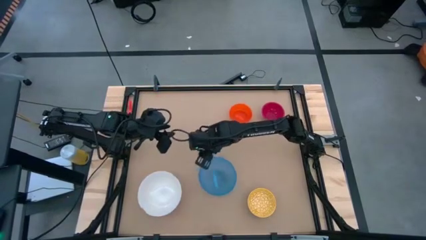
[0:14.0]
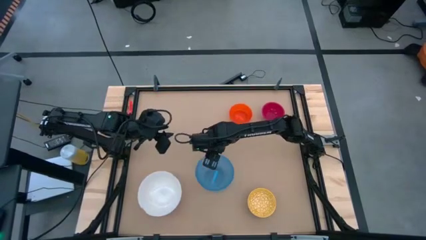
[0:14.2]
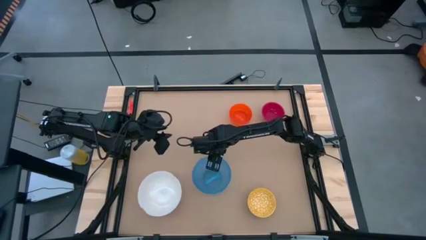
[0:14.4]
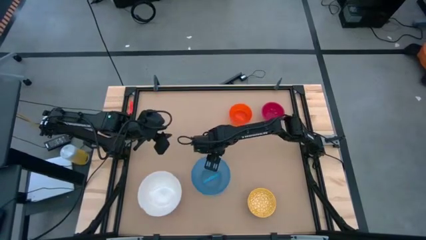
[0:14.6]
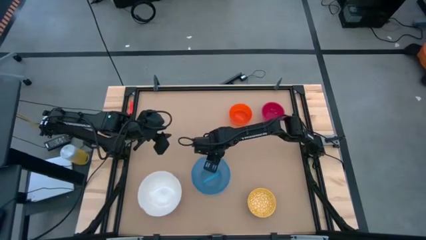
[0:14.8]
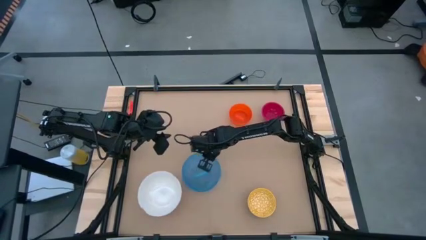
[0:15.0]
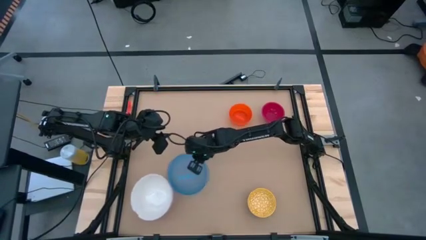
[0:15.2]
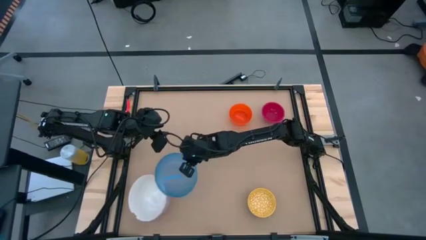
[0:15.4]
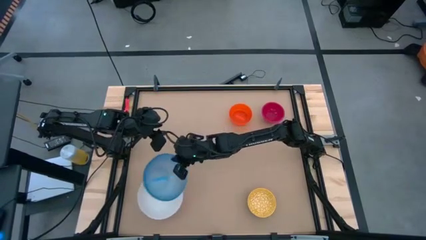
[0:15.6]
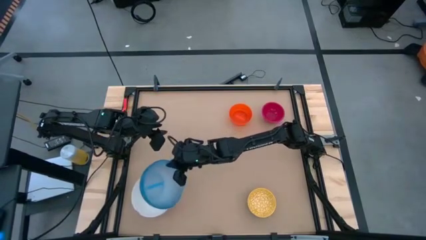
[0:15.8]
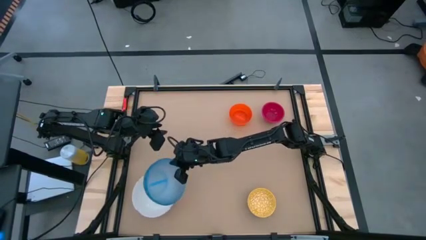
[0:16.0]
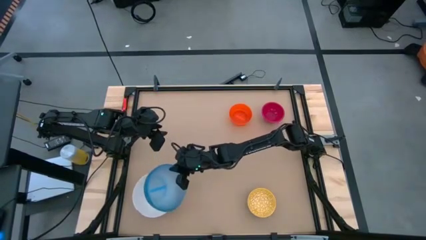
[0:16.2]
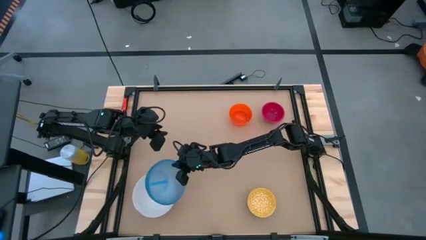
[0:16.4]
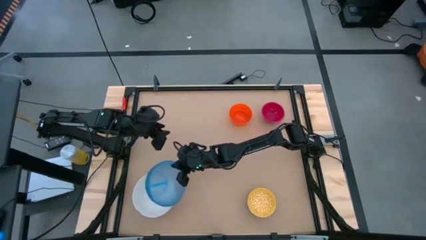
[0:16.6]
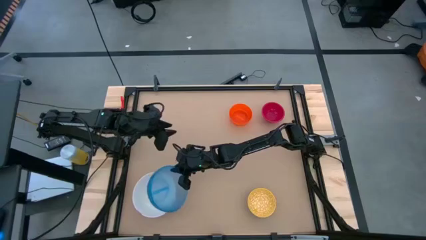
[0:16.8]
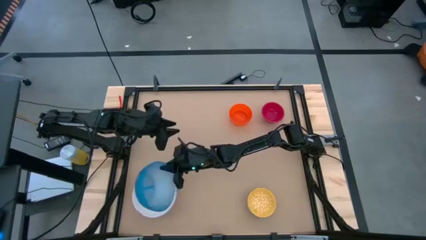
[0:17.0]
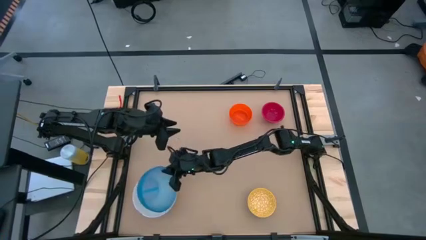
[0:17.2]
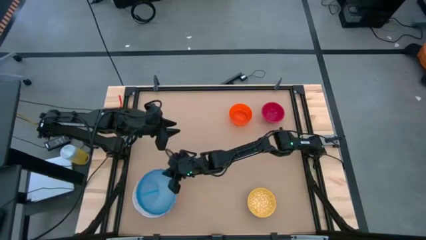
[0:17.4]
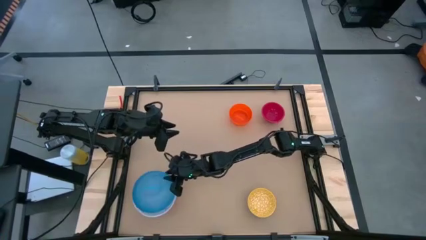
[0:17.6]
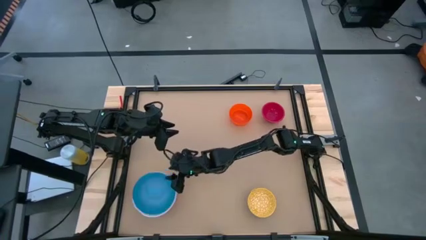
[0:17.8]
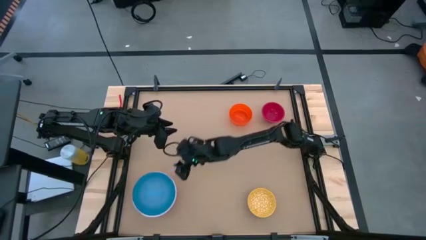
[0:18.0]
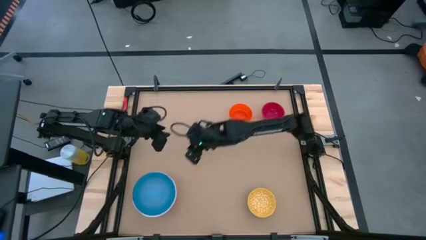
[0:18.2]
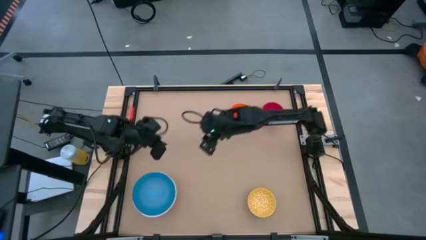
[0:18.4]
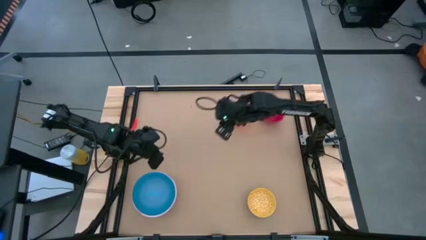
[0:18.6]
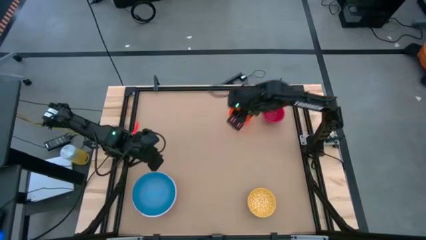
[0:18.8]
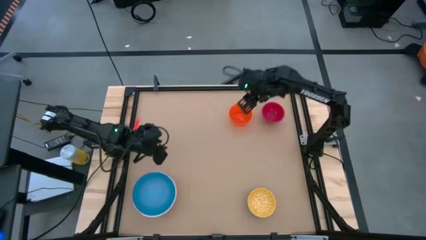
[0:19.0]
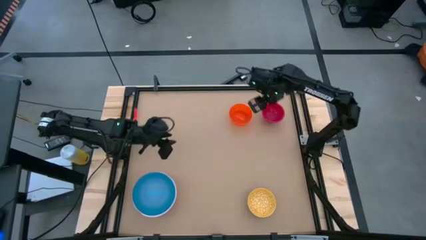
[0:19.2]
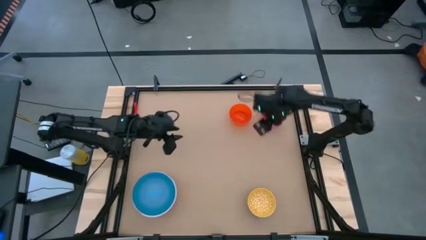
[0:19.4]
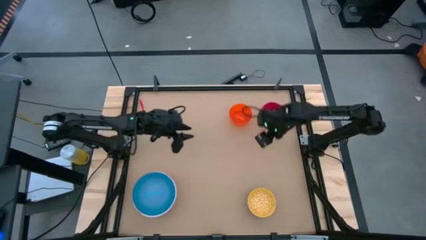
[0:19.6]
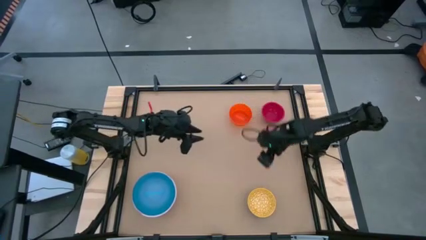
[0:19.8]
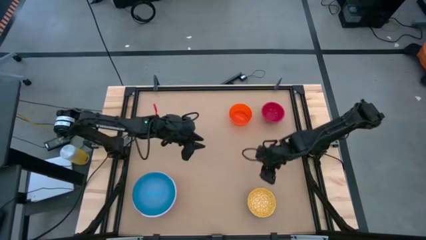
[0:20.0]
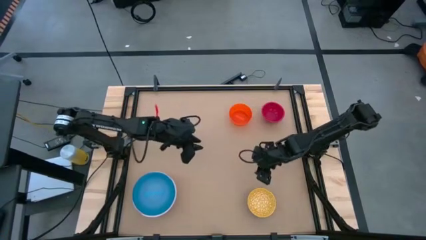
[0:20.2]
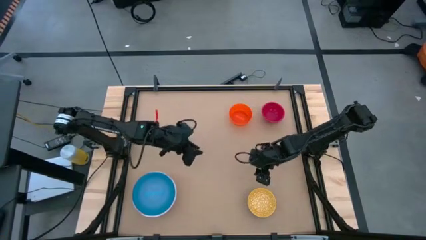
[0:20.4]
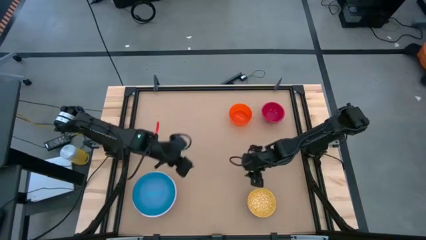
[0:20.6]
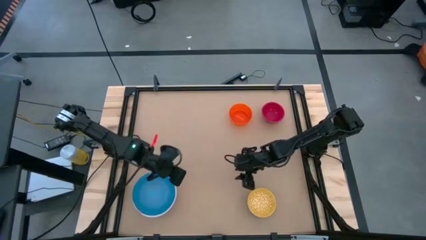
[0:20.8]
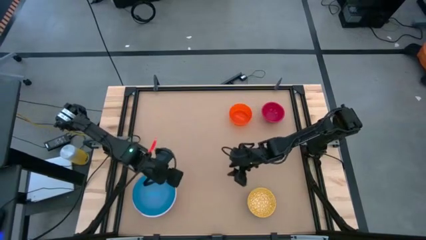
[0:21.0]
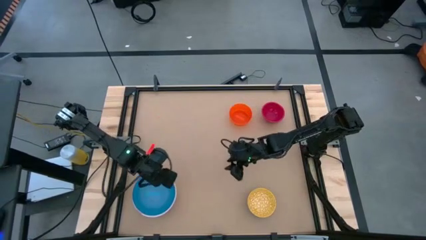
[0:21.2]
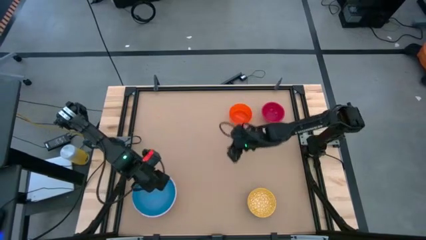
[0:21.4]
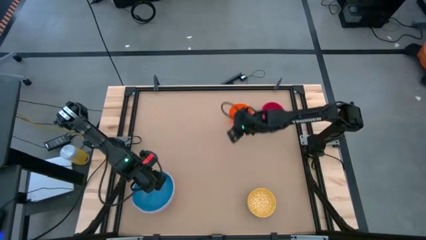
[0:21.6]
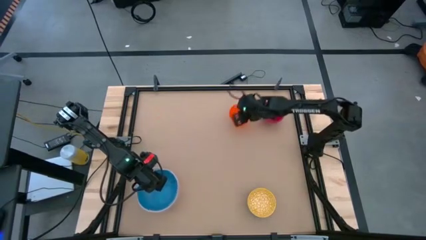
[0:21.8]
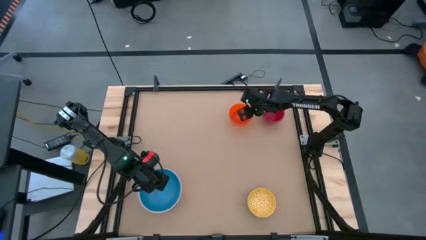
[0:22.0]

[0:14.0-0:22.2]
Stack the blue bowl on top of the white bowl

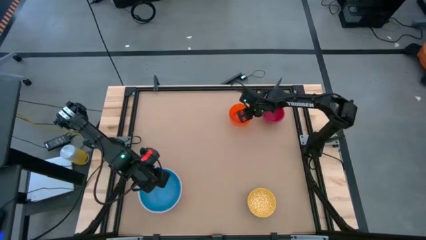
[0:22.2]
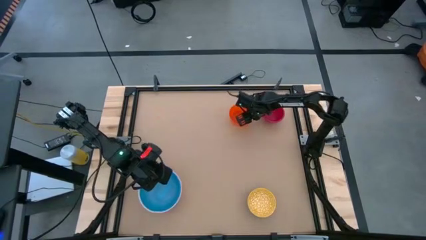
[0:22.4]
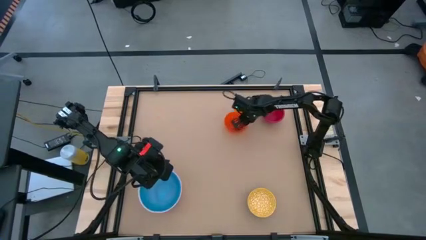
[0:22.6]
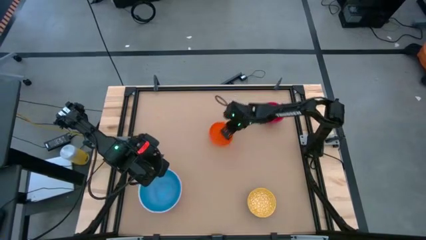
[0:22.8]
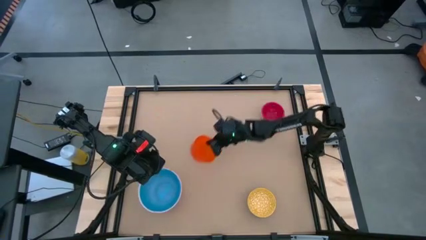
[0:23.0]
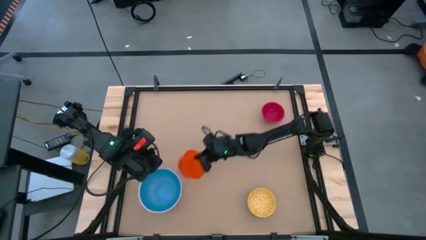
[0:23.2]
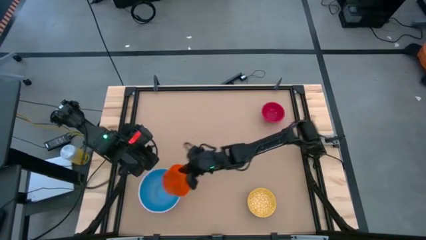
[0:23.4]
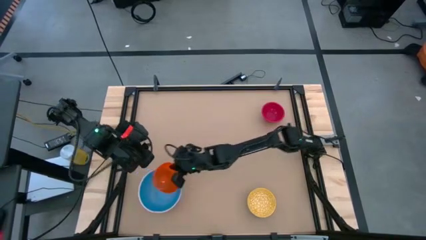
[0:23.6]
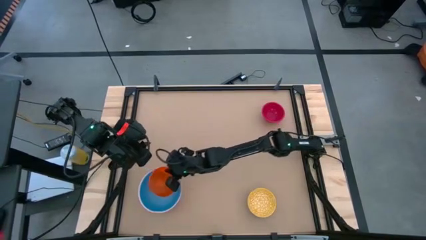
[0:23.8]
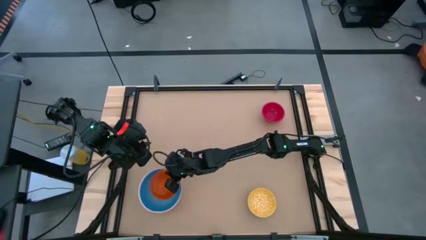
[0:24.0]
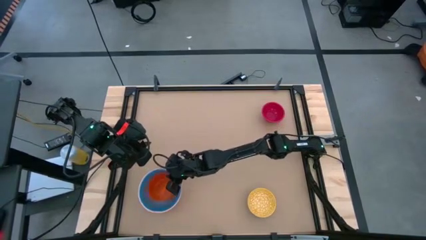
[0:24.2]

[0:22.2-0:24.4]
Stack the orange bowl on top of the blue bowl

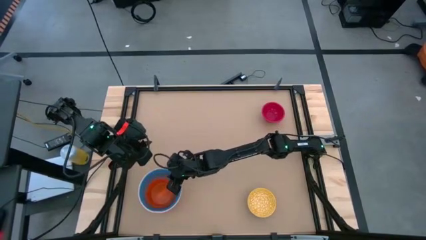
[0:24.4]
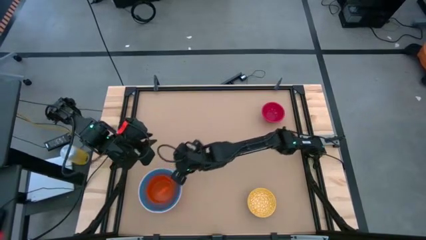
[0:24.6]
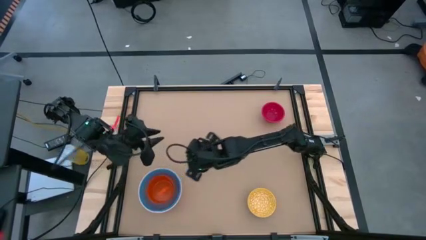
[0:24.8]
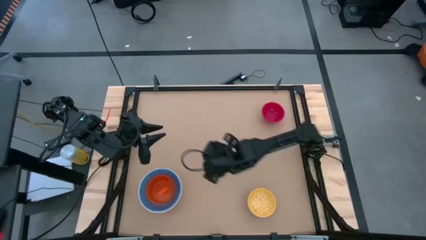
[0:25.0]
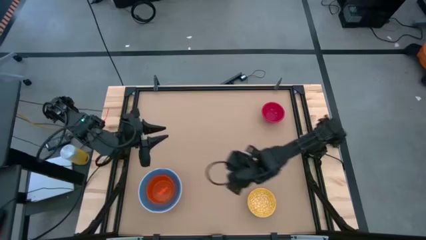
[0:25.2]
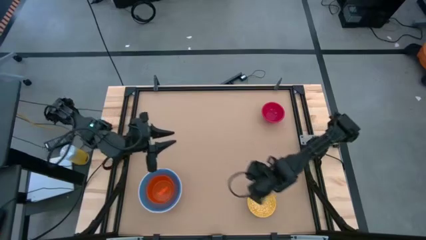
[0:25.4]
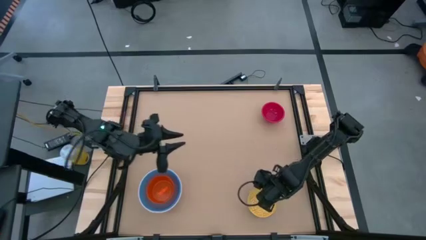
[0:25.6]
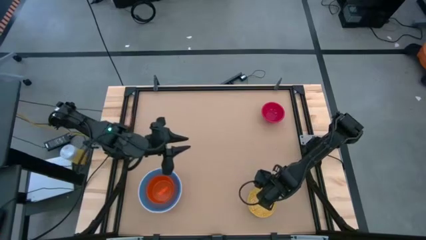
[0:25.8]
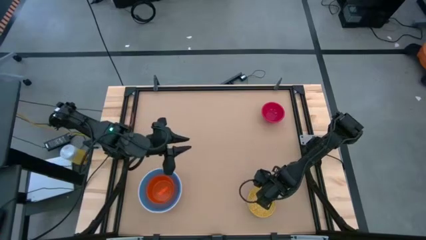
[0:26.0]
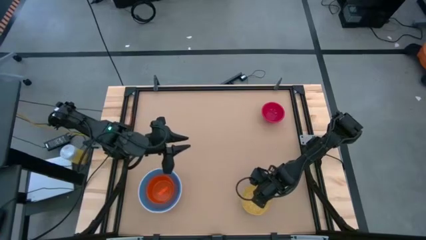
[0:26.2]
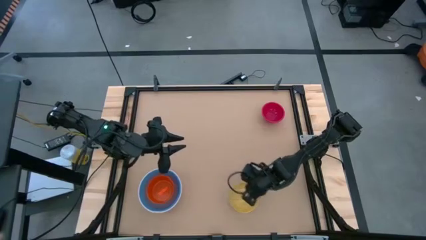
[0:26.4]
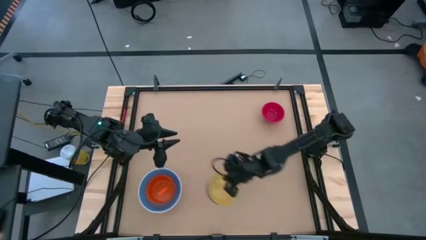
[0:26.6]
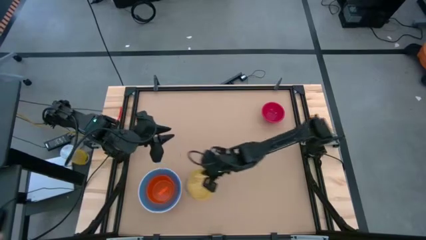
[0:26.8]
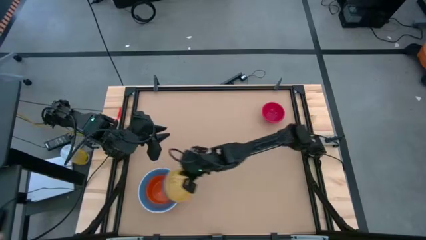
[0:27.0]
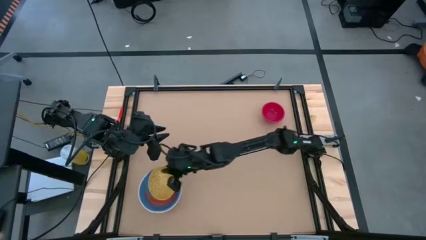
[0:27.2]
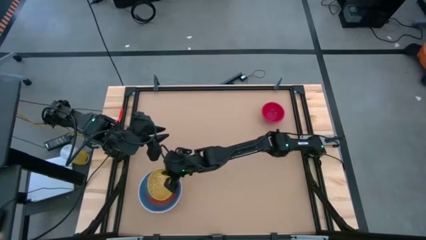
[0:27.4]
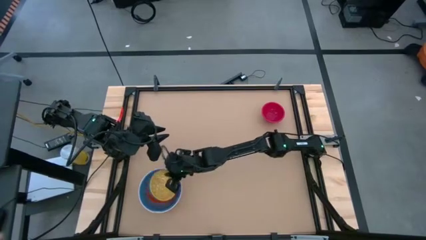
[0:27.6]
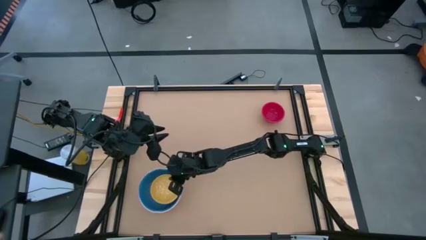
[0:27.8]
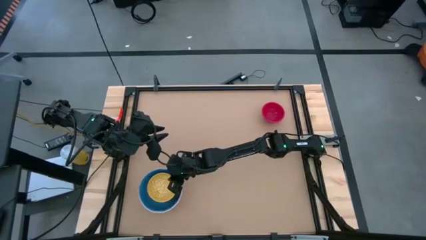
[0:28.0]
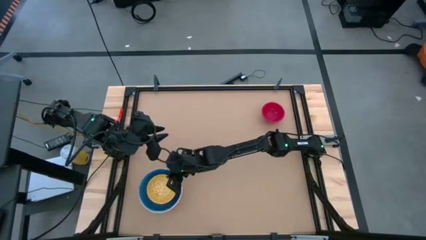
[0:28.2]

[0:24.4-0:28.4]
Stack the yellow bowl on top of the orange bowl

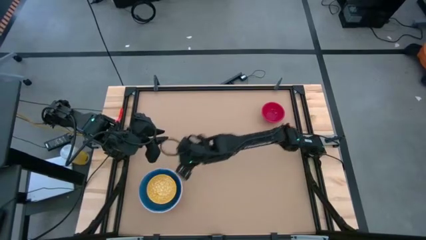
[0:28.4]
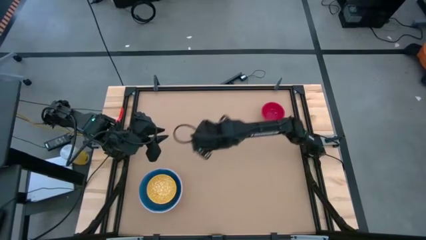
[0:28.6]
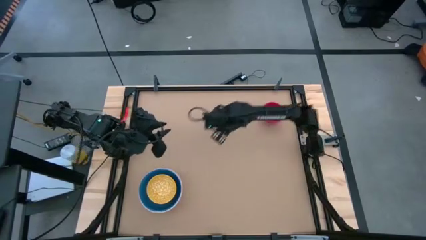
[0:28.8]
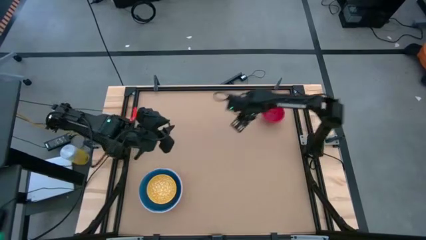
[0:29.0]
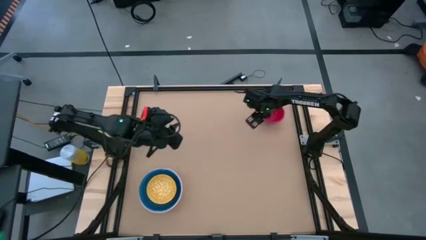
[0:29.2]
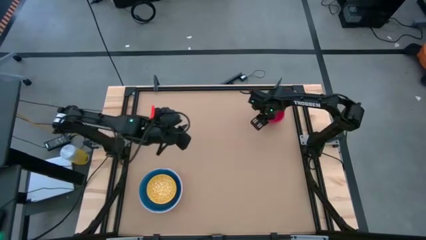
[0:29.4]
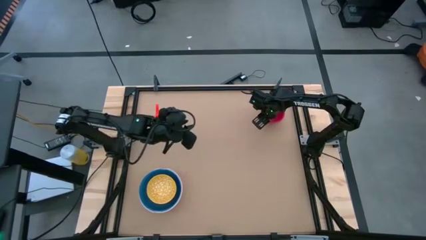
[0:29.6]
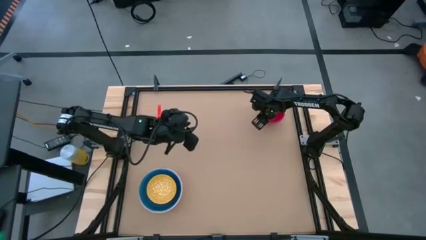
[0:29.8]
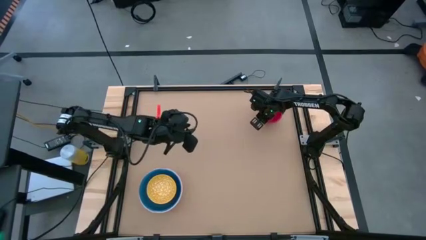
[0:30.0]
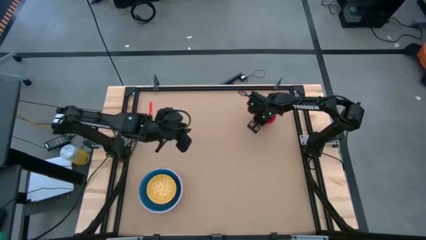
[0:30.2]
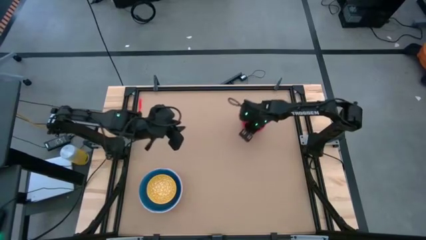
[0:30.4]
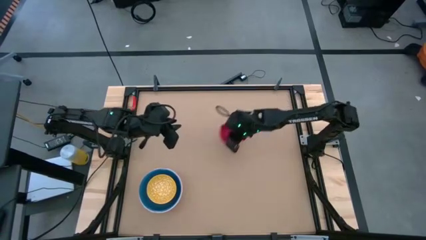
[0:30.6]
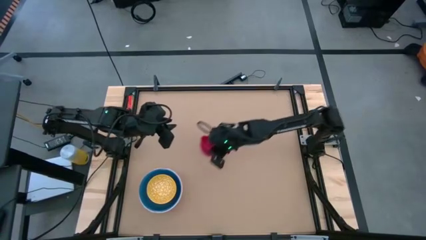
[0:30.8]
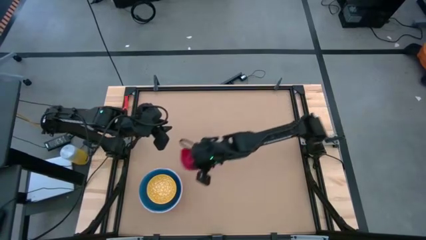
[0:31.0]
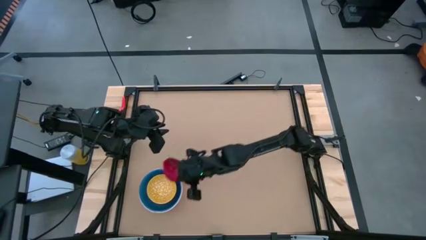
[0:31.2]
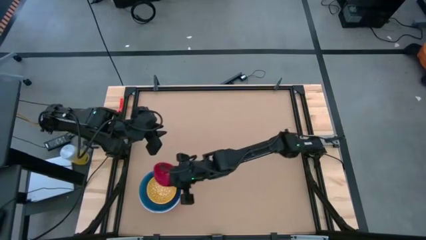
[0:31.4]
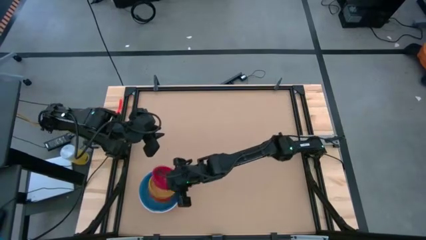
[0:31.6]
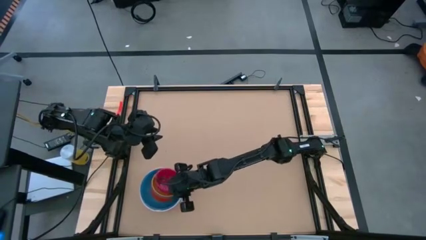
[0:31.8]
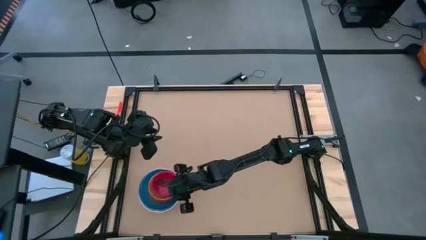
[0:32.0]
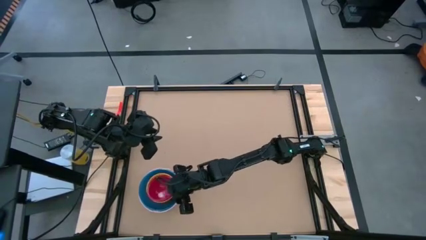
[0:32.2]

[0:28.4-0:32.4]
Stack the red bowl on top of the yellow bowl
